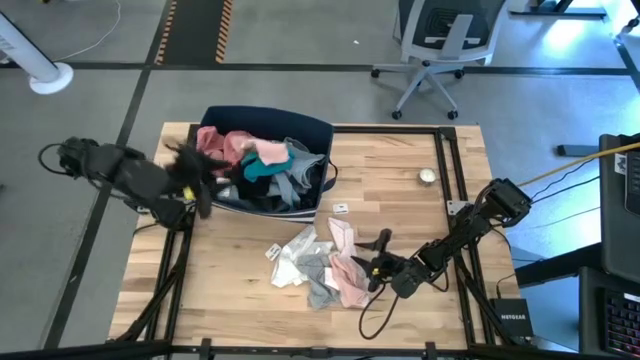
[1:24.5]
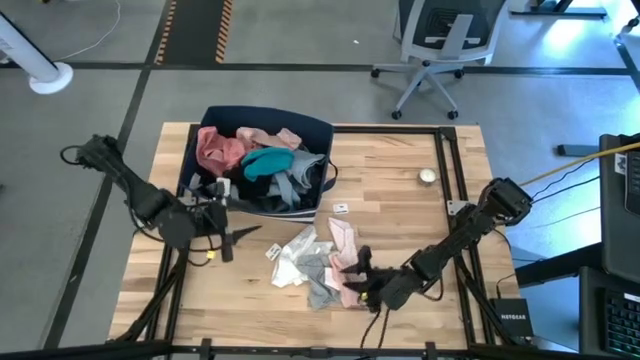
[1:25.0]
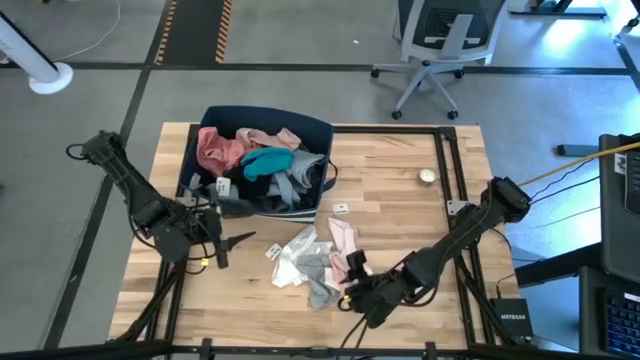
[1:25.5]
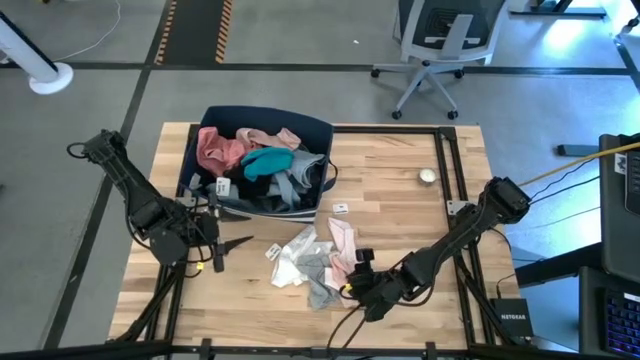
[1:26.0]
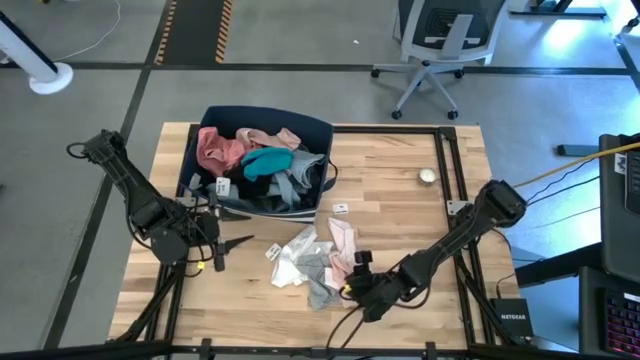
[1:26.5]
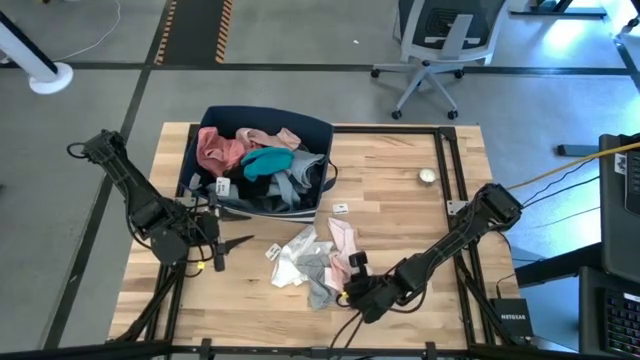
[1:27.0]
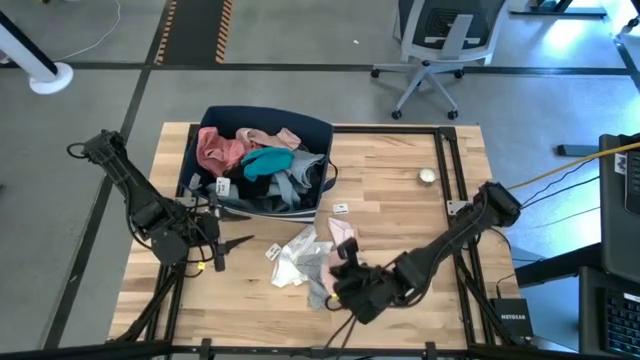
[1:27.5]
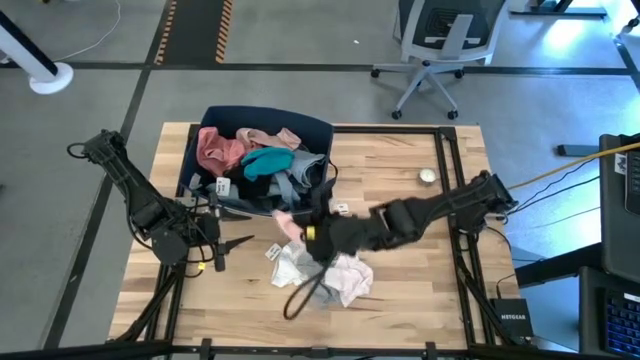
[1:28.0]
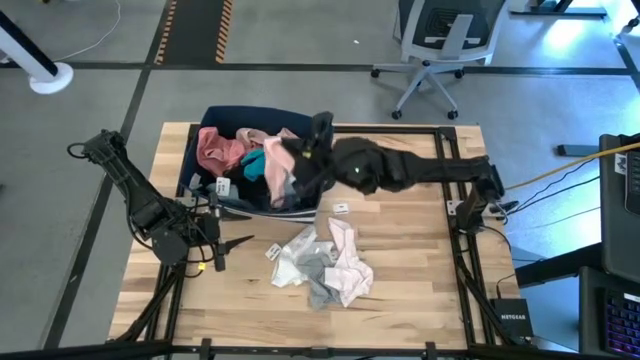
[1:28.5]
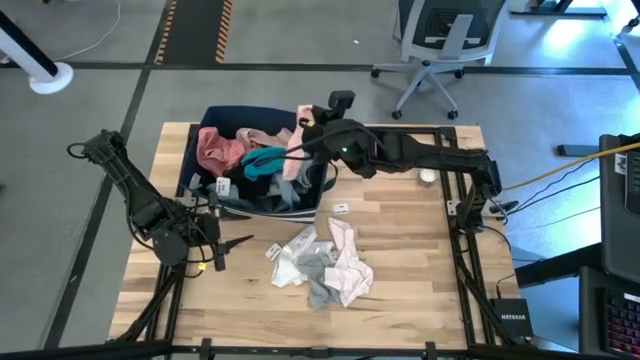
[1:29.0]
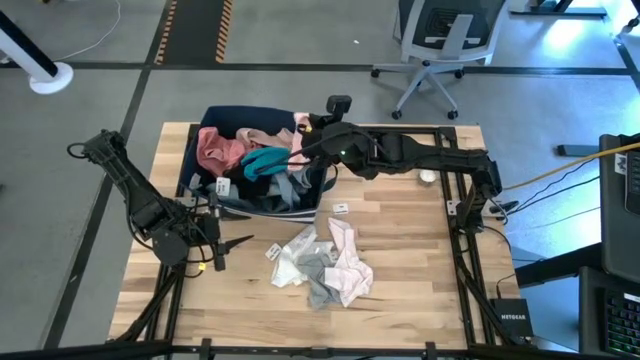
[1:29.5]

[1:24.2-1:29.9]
Task: Sort clothes
Put the pink sock into the blue laundry organizer

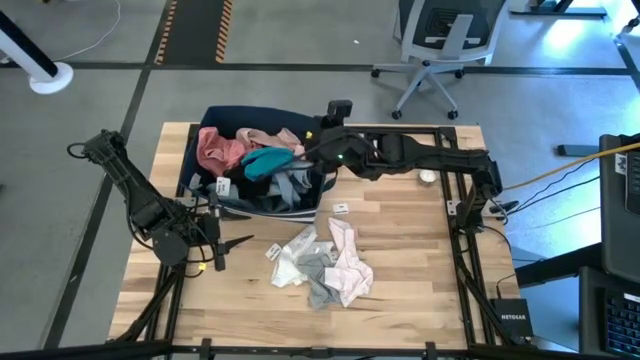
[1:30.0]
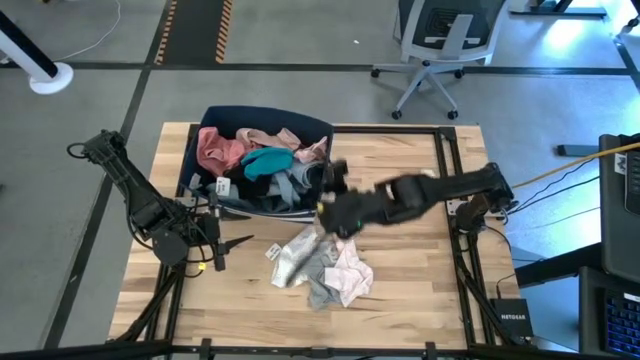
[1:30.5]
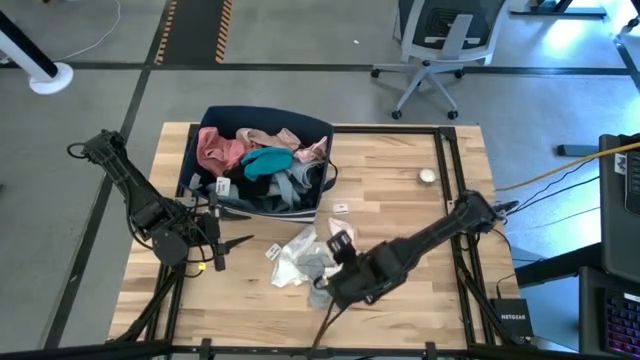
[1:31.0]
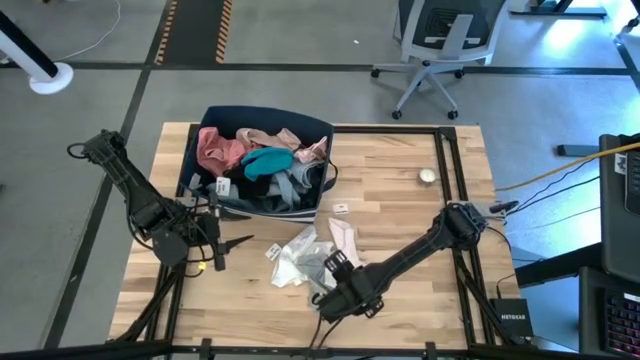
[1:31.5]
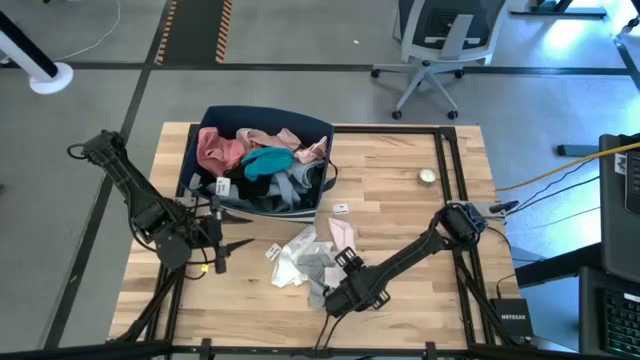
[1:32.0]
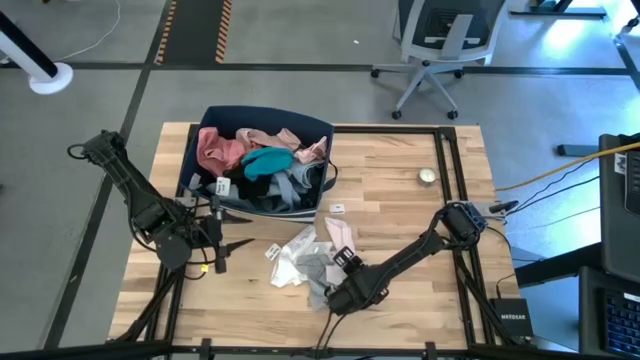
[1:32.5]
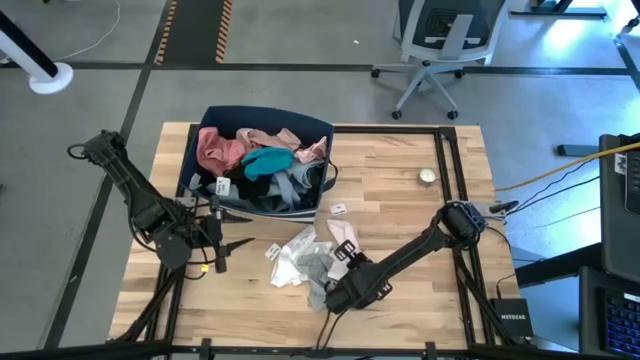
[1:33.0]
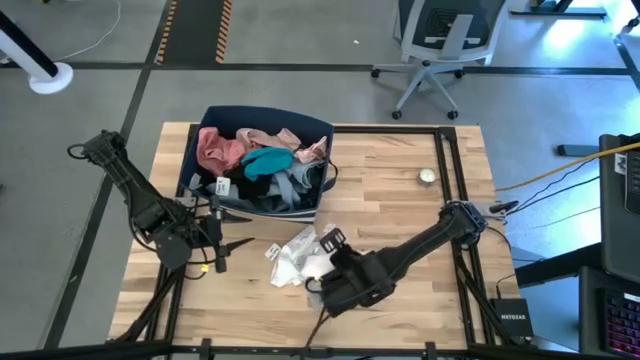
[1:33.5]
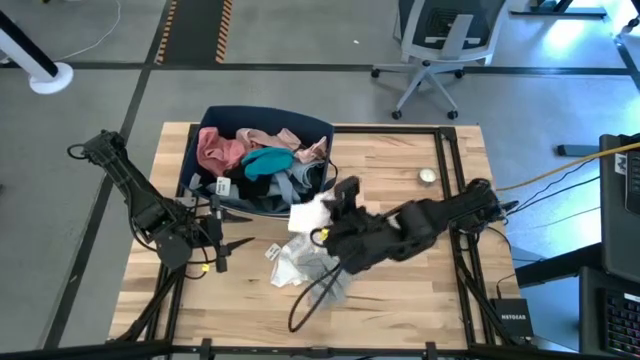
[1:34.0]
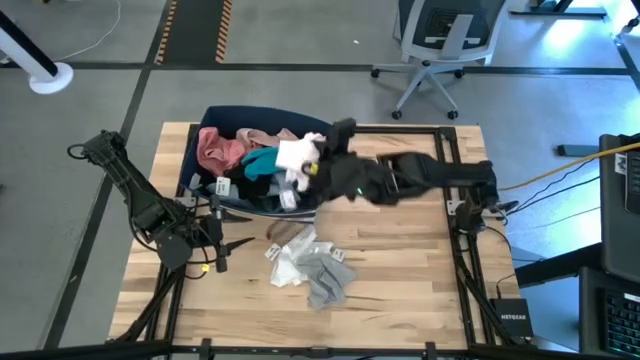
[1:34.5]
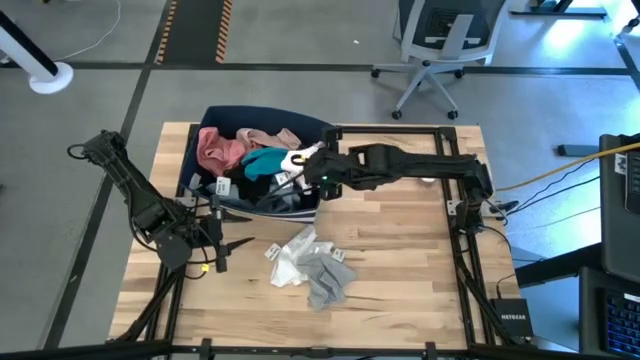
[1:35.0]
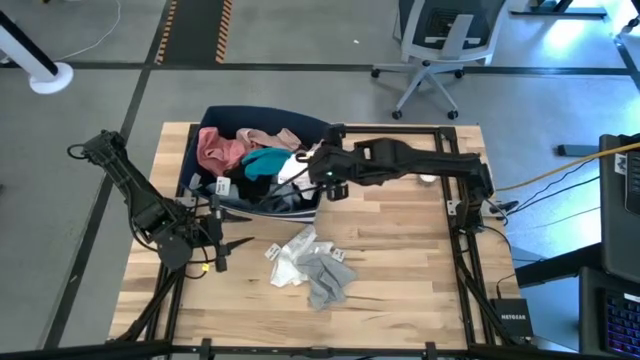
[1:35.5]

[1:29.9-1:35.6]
Put the light pink shirt into the blue laundry organizer

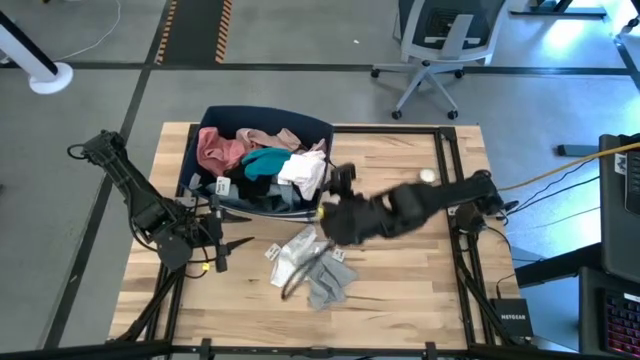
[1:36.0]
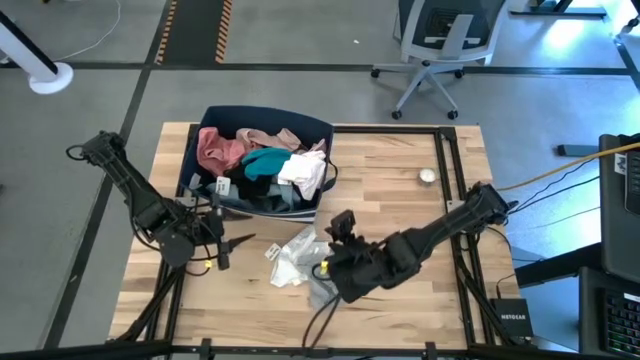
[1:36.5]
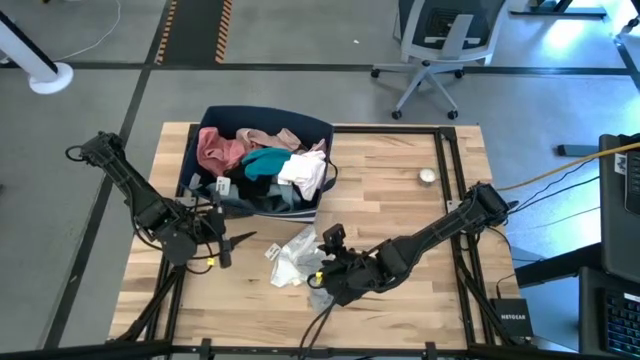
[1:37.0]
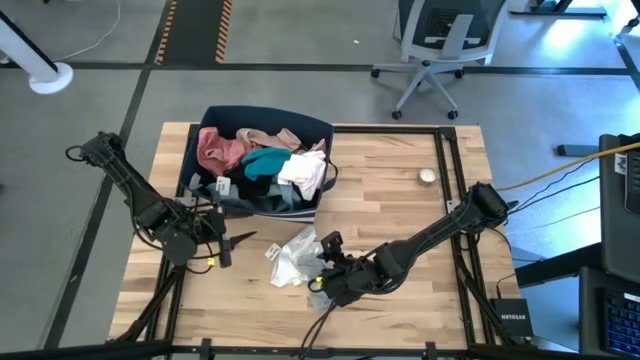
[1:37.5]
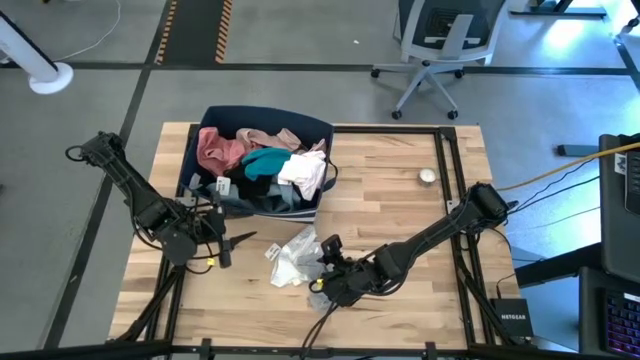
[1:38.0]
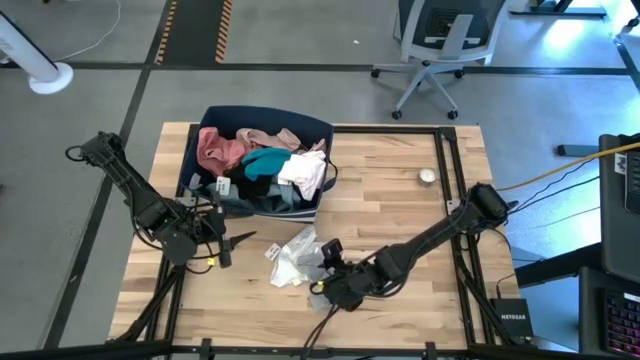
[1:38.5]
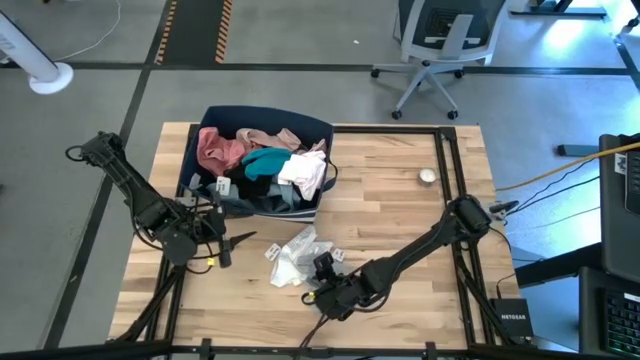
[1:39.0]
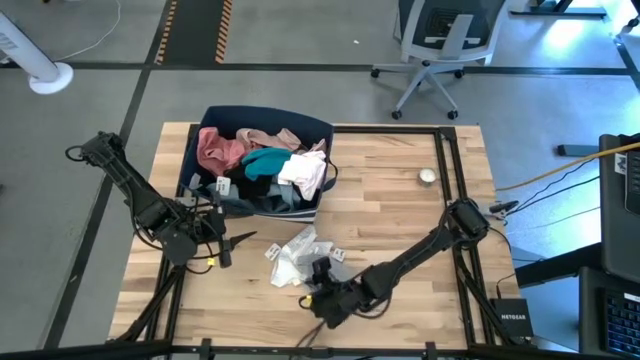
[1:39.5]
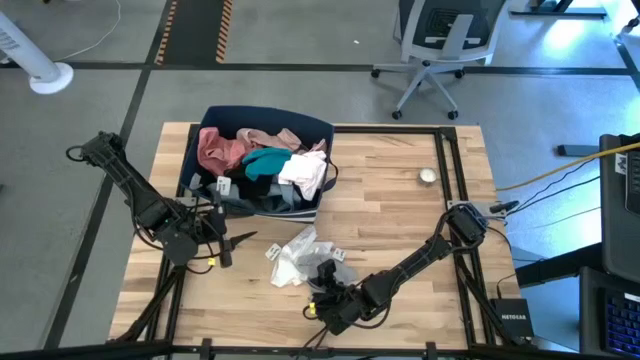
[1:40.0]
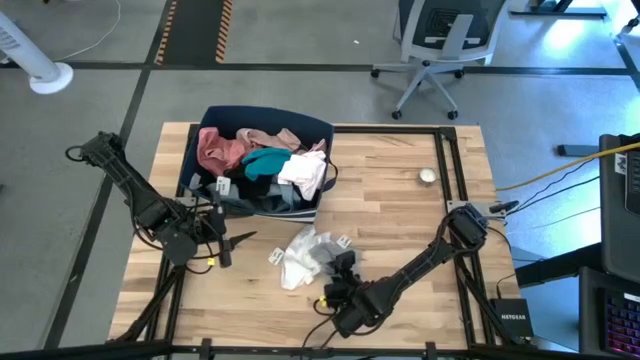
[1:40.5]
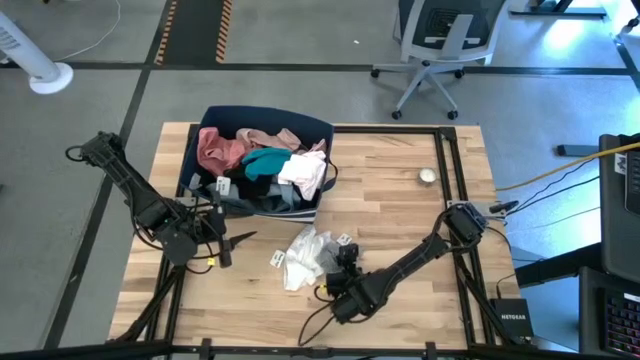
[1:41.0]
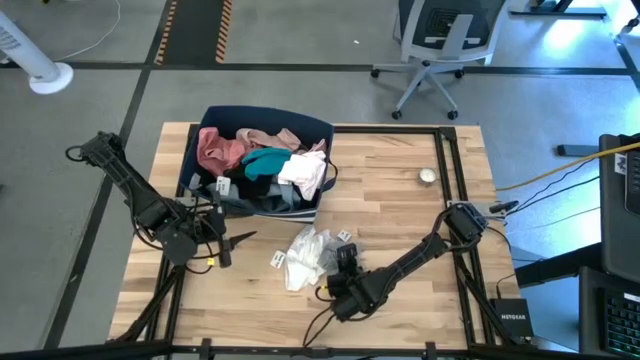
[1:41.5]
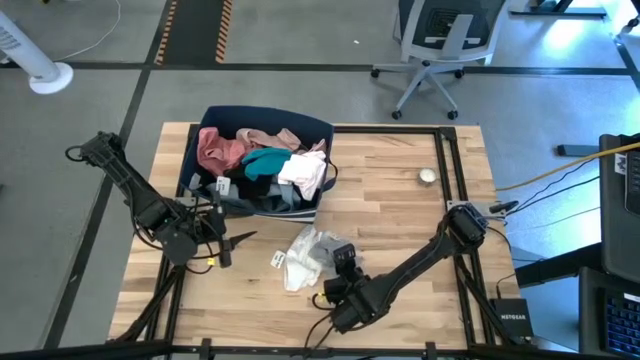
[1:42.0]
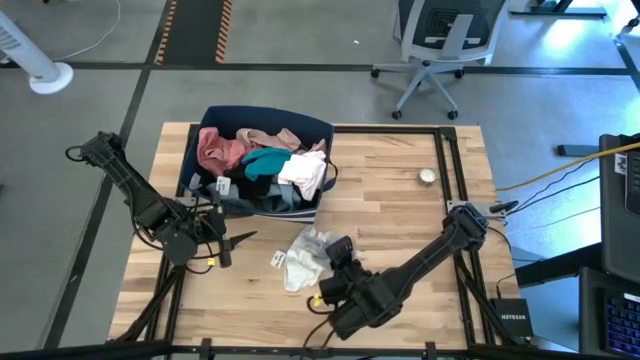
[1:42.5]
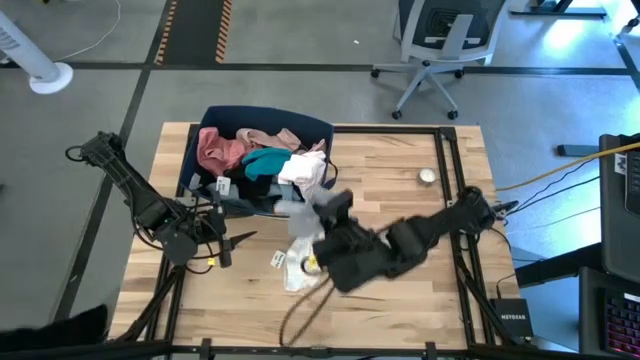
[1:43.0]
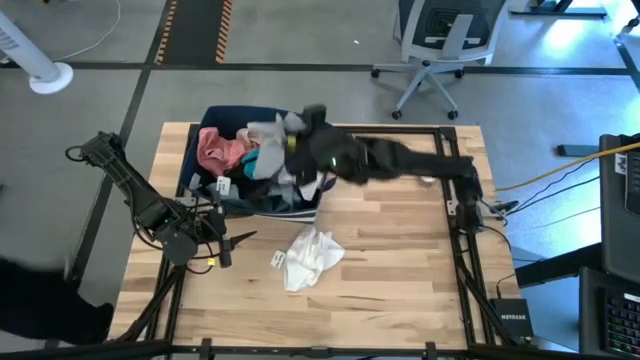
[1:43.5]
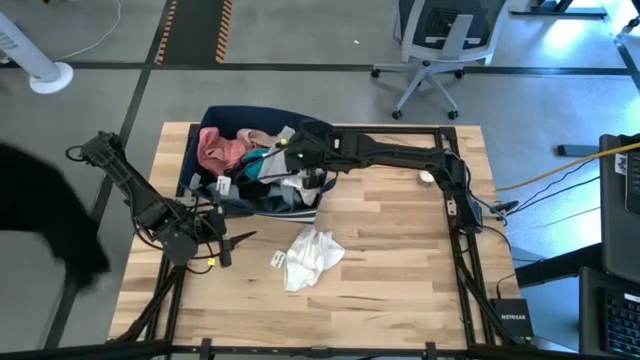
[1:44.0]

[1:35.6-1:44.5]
Put the gray underwear into the blue laundry organizer

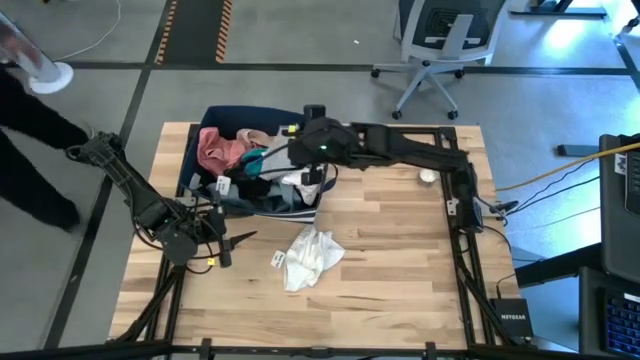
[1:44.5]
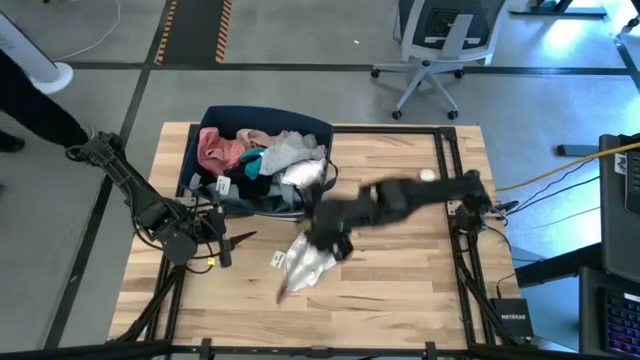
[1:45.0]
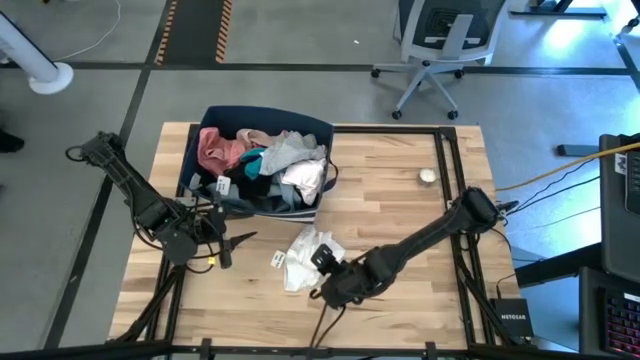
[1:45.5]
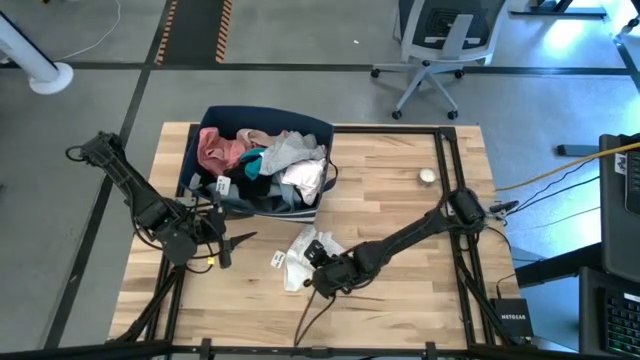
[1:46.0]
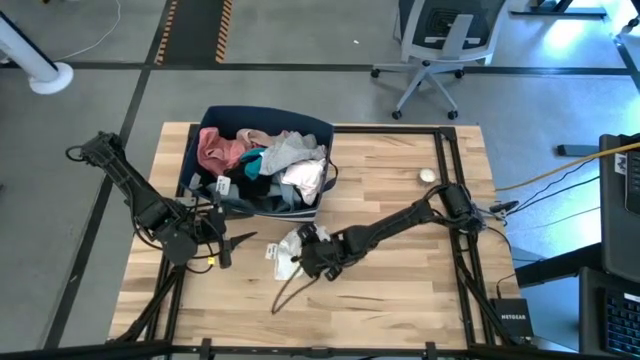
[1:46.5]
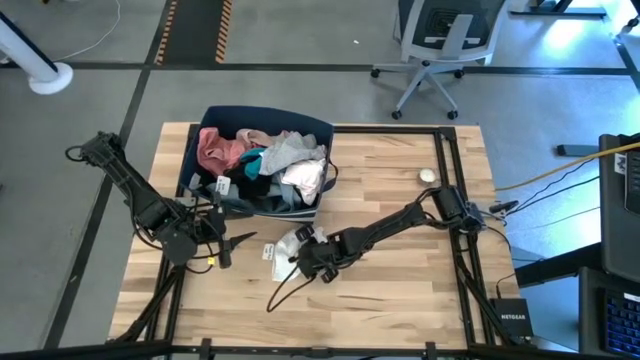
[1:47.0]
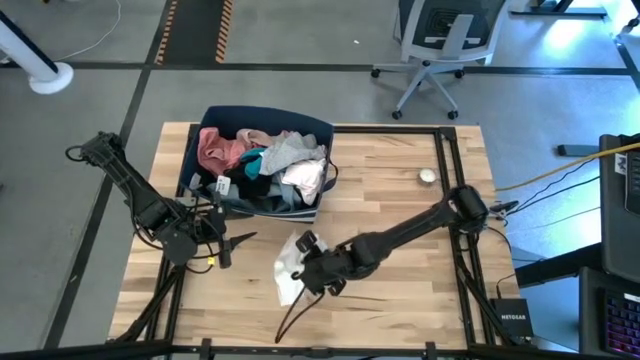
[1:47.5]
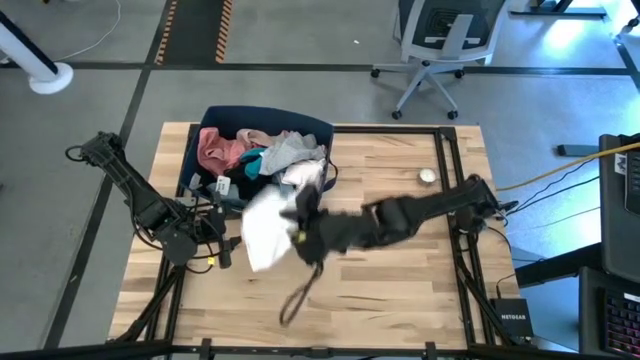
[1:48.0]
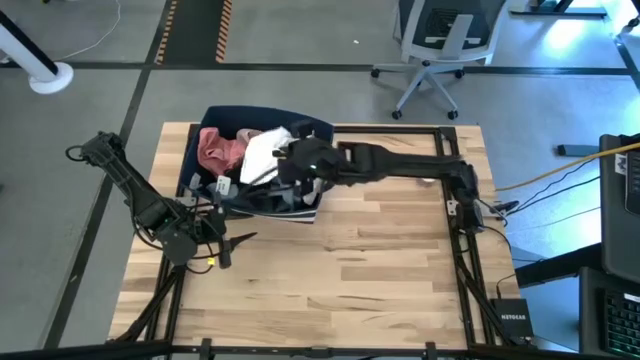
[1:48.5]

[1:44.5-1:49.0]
Put the white underwear into the blue laundry organizer
